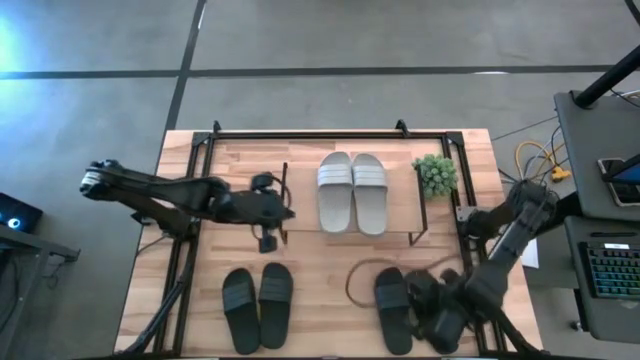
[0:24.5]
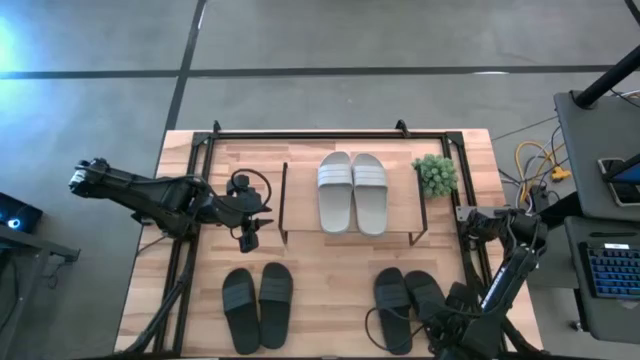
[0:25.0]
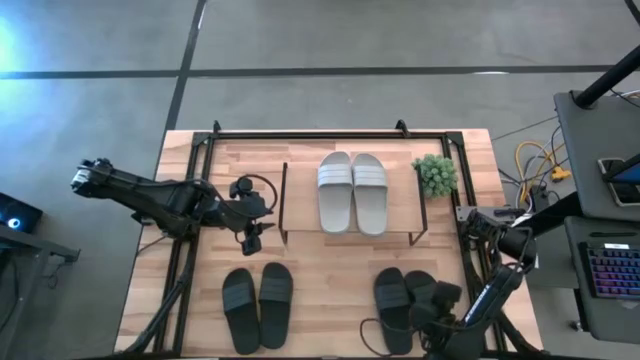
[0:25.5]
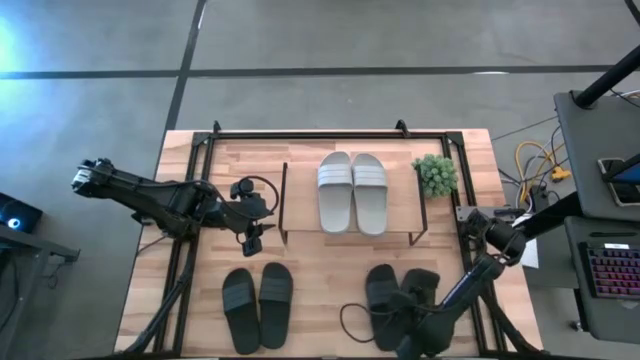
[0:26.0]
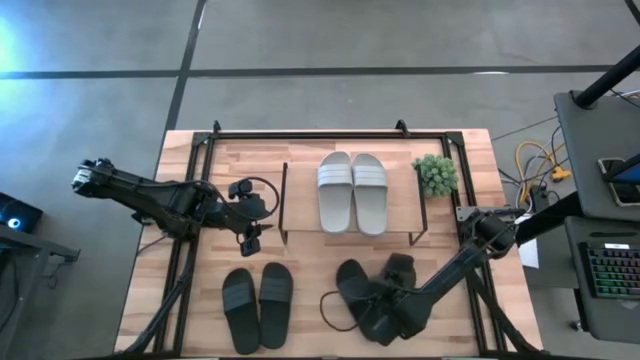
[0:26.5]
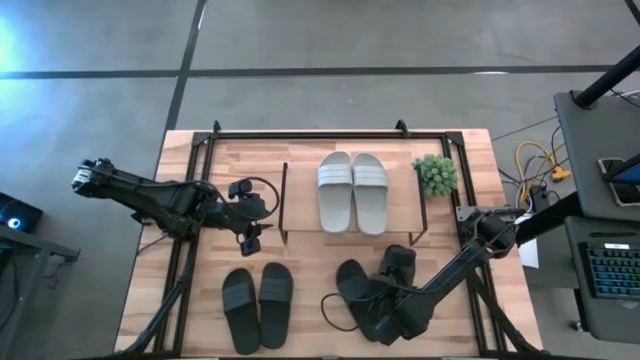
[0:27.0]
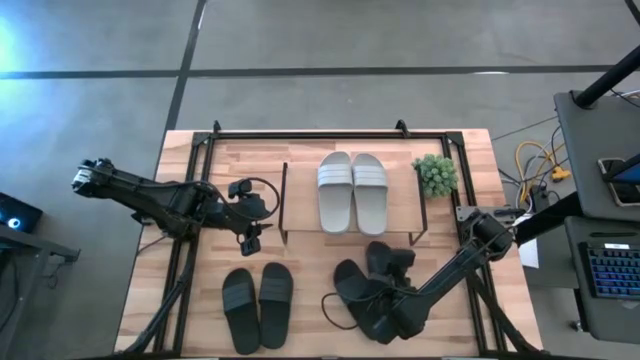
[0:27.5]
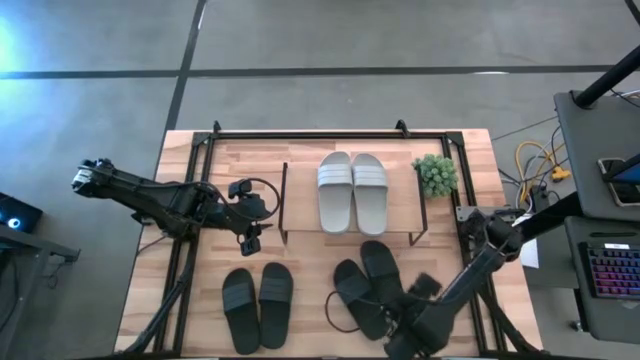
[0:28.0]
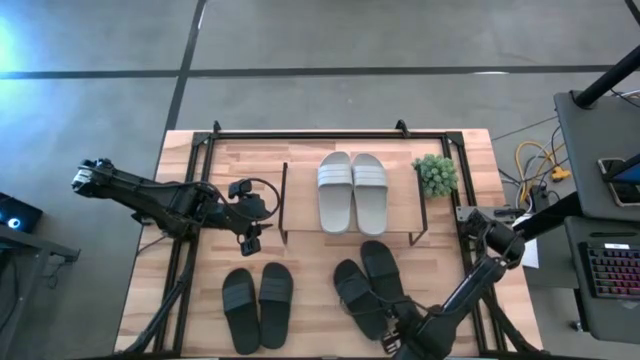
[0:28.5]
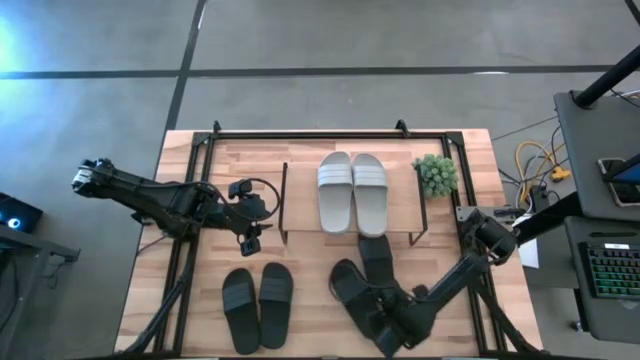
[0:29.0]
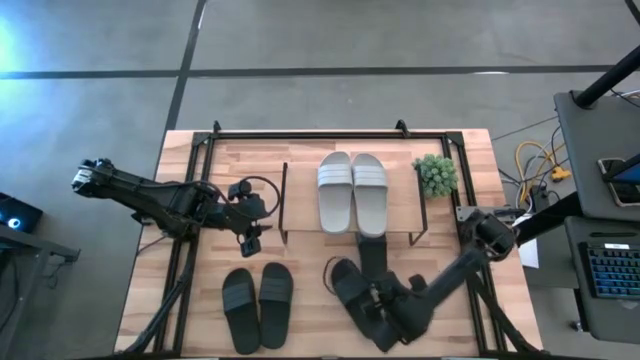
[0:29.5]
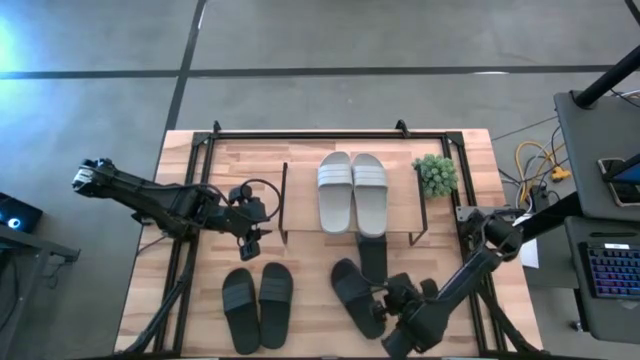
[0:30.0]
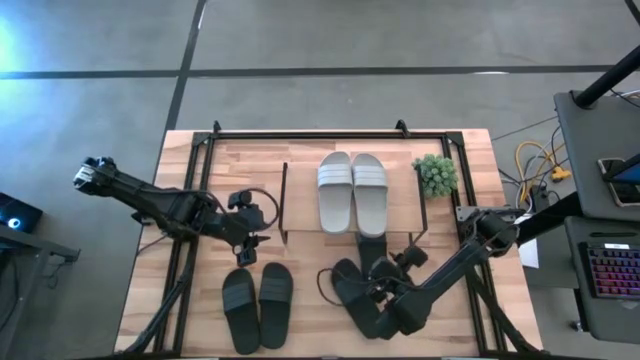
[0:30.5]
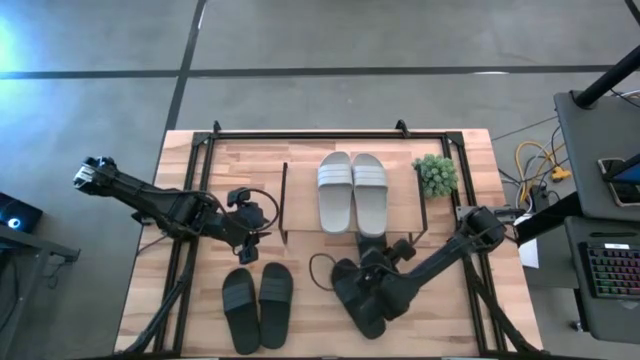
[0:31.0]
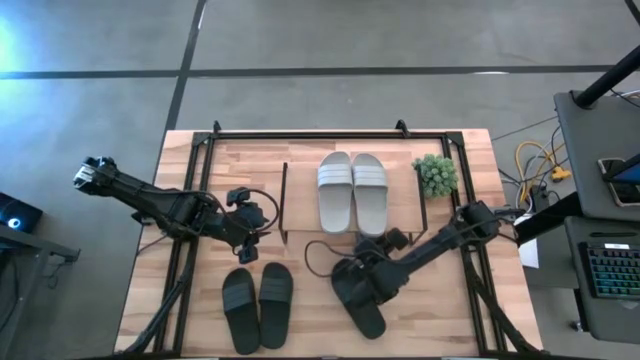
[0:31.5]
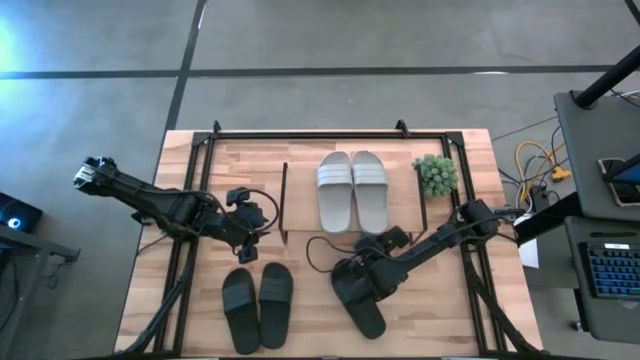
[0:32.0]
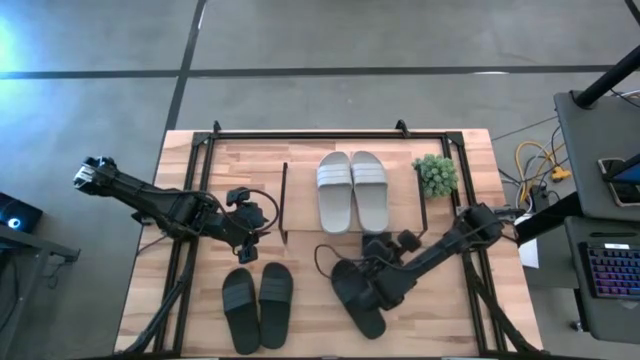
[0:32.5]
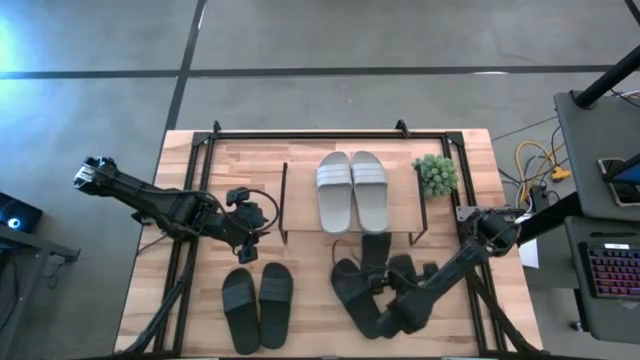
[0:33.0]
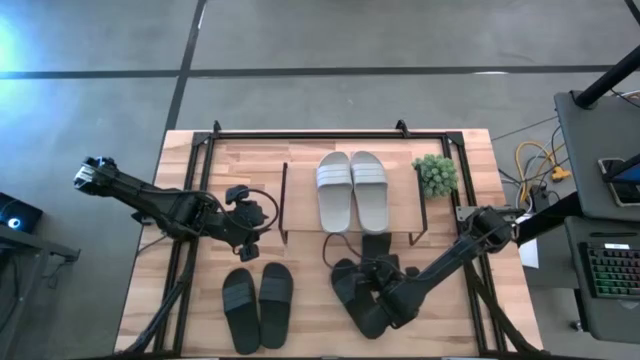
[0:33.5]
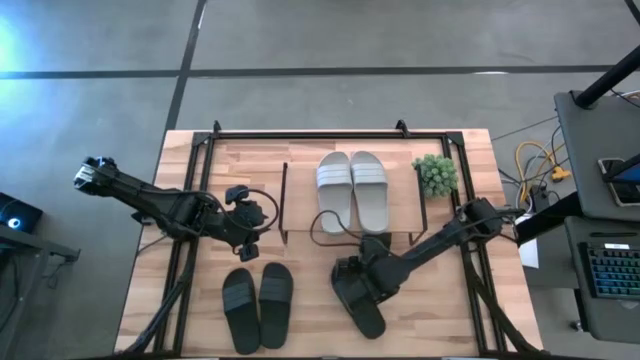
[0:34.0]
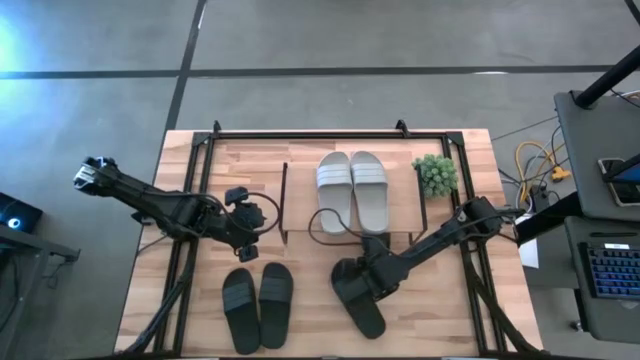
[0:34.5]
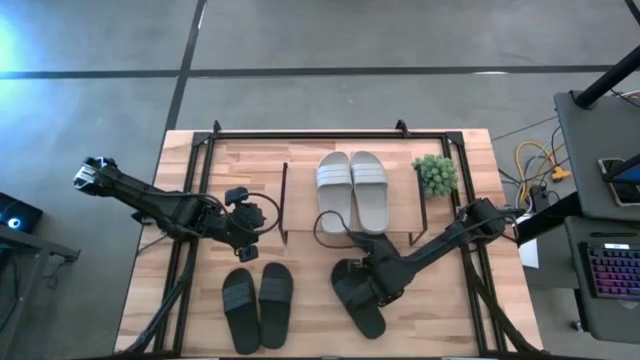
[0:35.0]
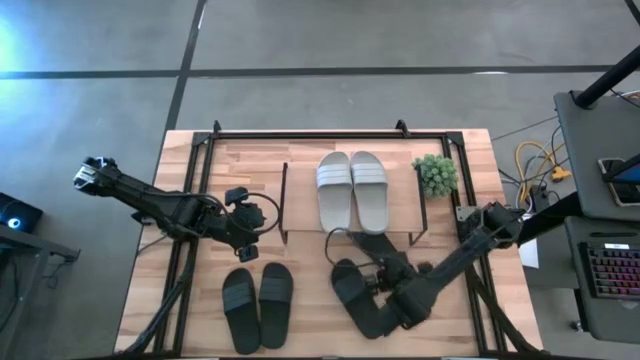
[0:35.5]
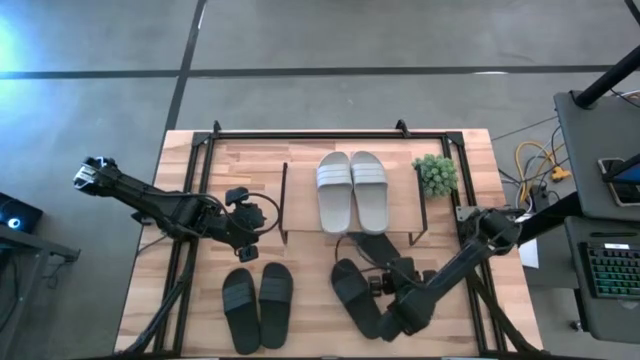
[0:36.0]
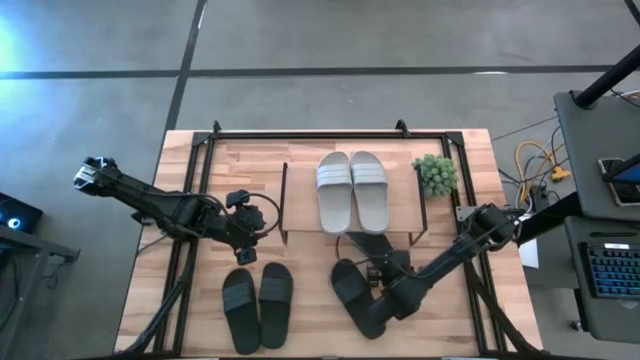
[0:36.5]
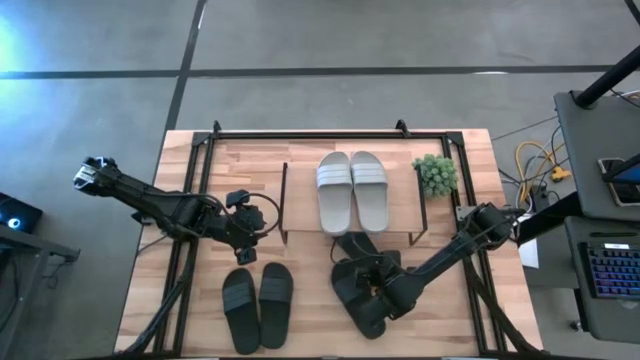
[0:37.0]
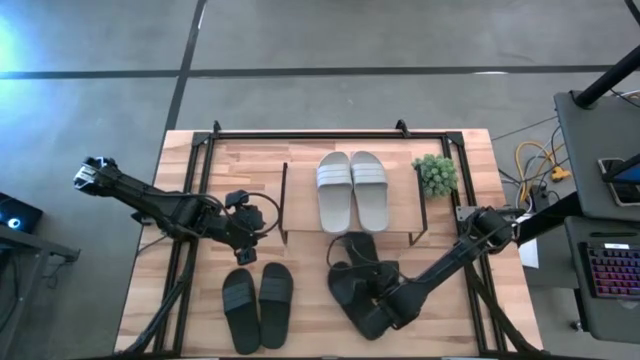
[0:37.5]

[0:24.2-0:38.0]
Task: Pick and place slides into the shelf
Put the right black slide under the shelf

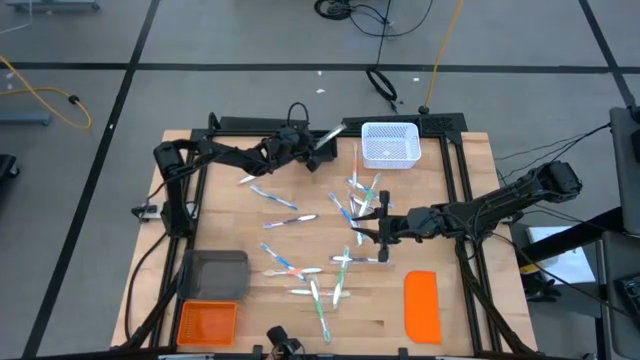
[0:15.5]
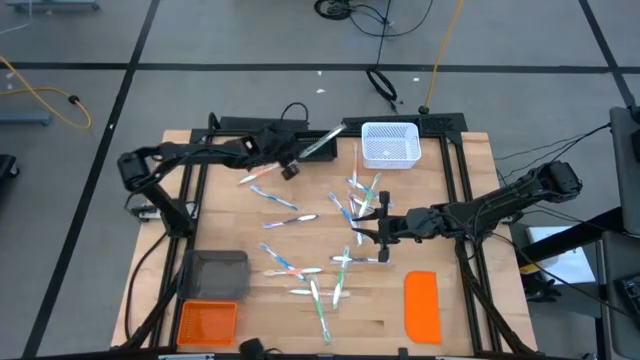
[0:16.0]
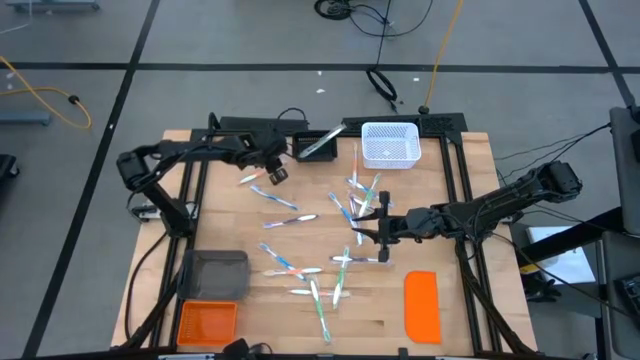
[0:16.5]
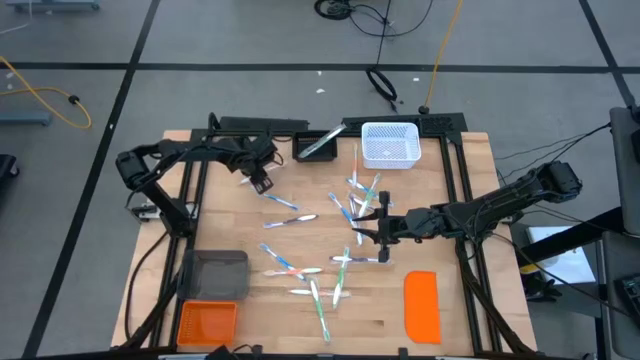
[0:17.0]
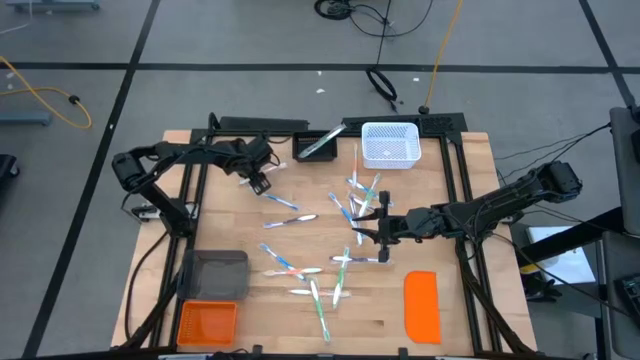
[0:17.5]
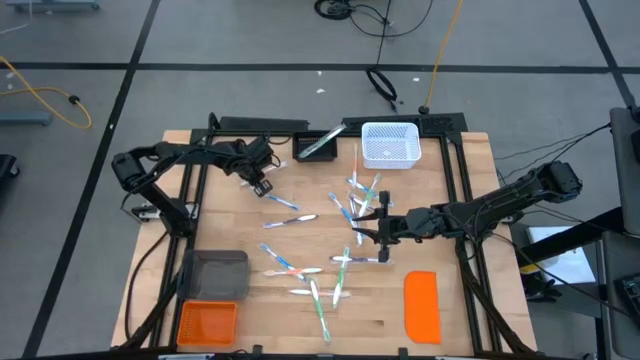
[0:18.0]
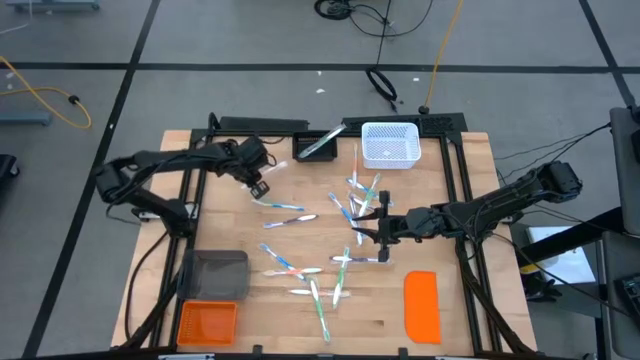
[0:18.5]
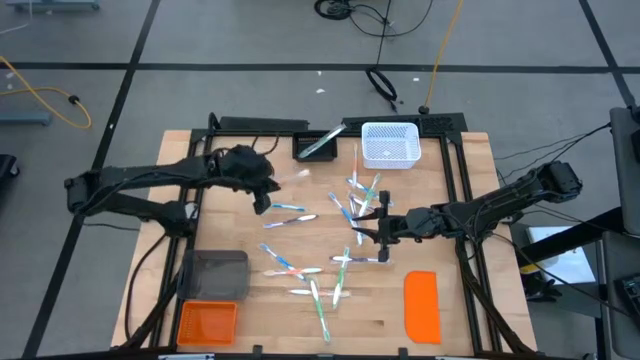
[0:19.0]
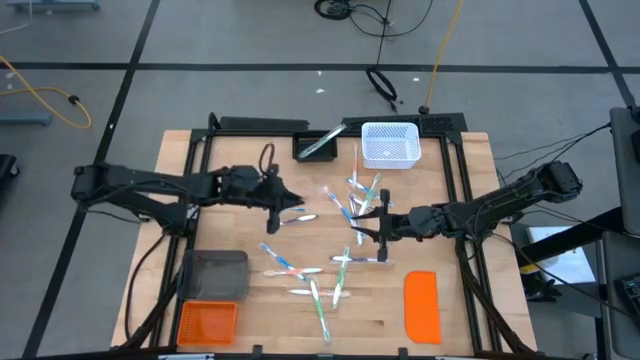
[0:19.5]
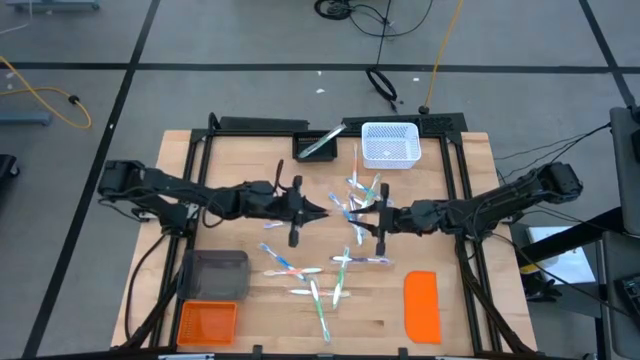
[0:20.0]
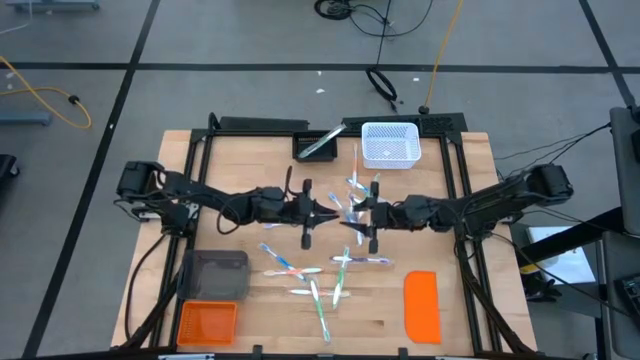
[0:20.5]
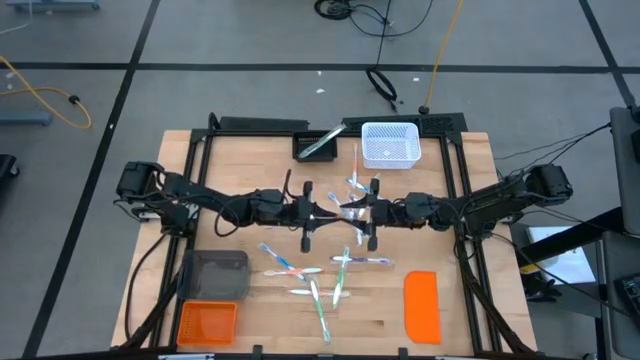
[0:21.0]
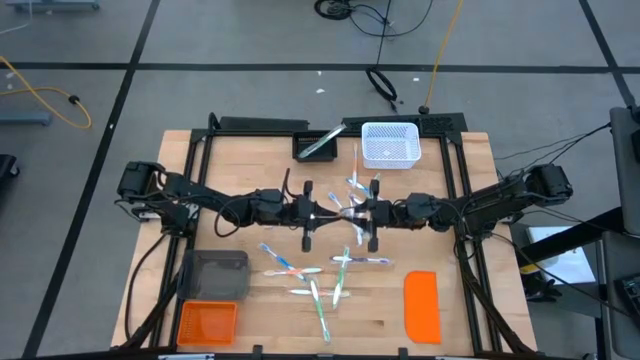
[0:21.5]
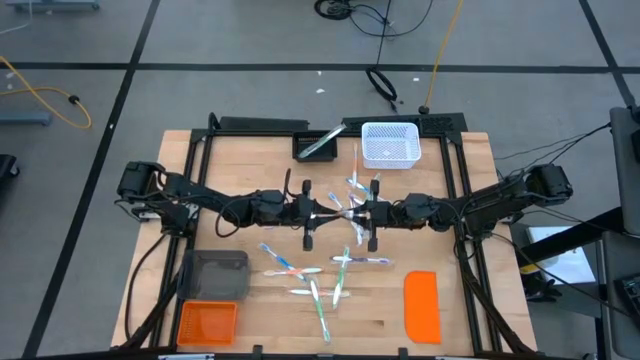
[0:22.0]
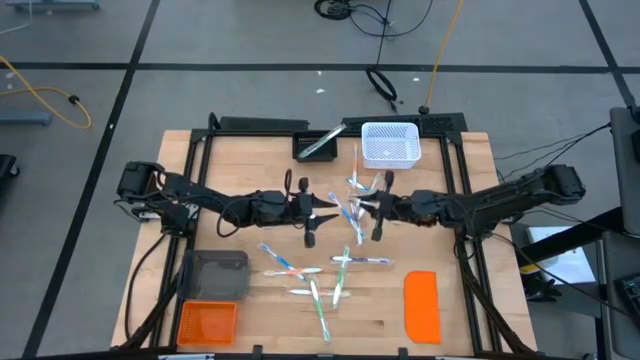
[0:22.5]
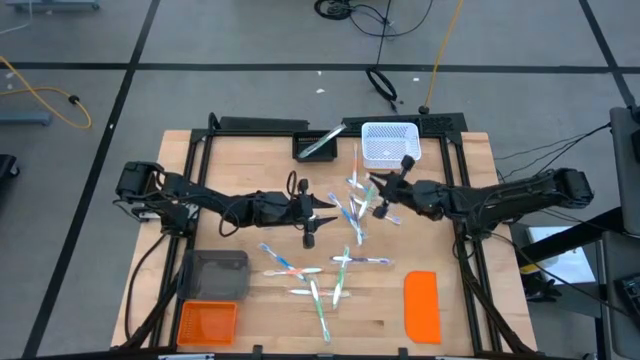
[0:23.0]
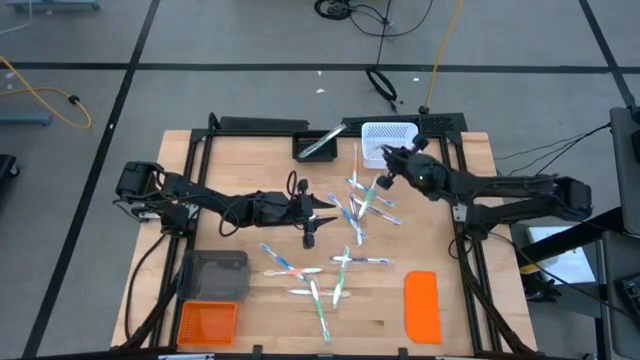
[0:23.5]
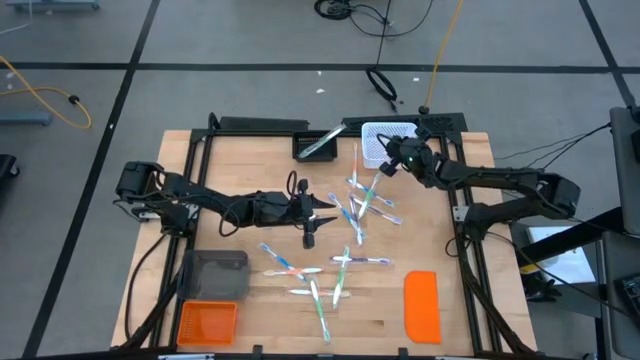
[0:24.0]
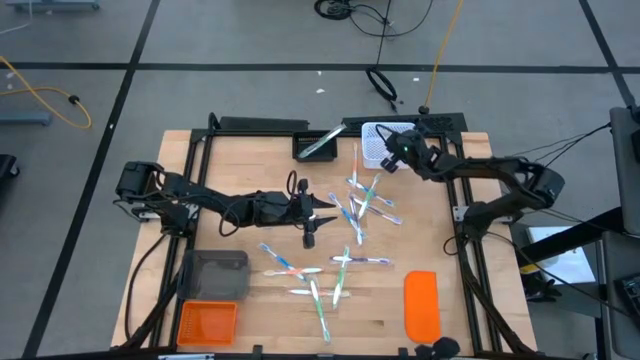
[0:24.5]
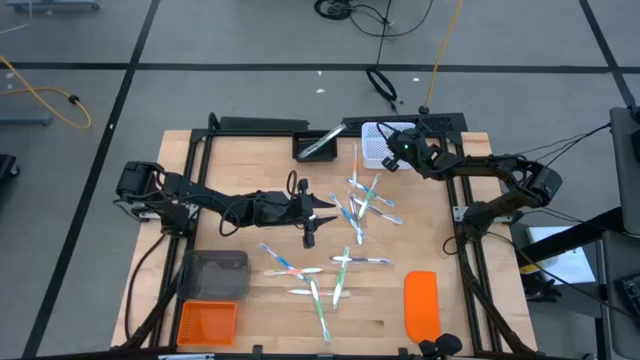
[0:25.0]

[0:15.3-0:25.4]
Task: Pick & Place Toothbrushes
Put the orange toothbrush into the white bin
